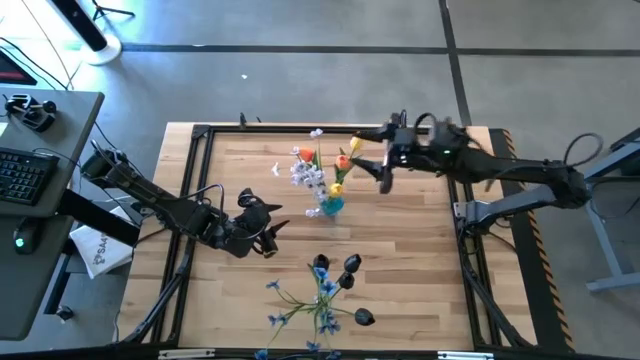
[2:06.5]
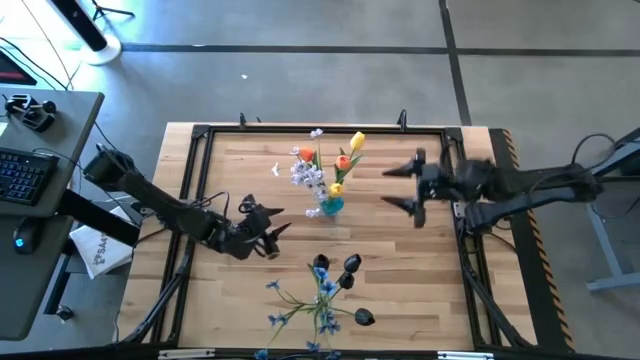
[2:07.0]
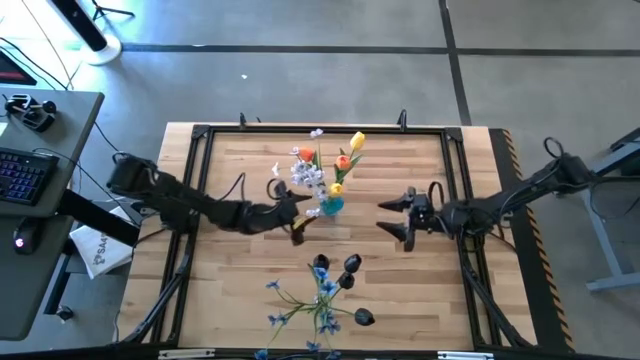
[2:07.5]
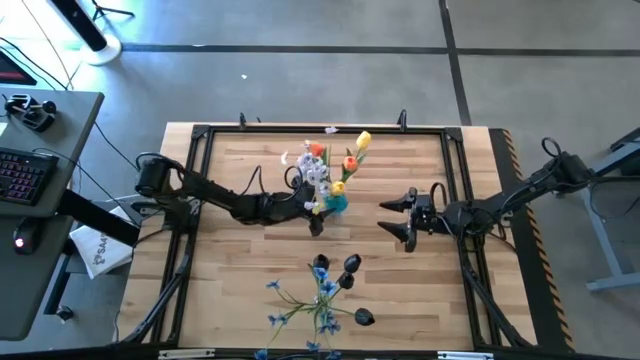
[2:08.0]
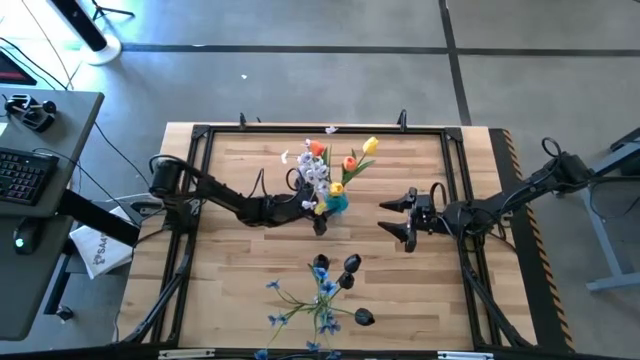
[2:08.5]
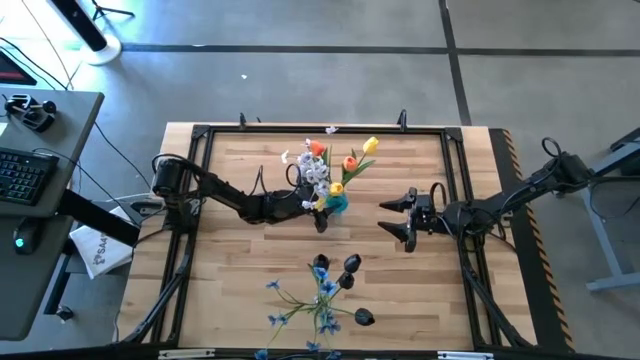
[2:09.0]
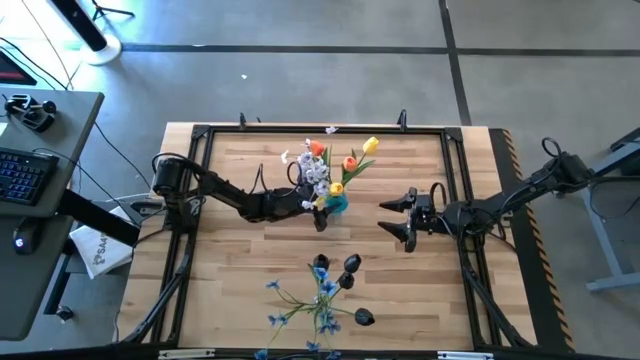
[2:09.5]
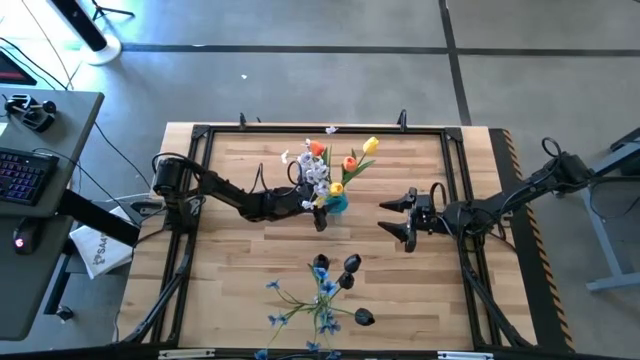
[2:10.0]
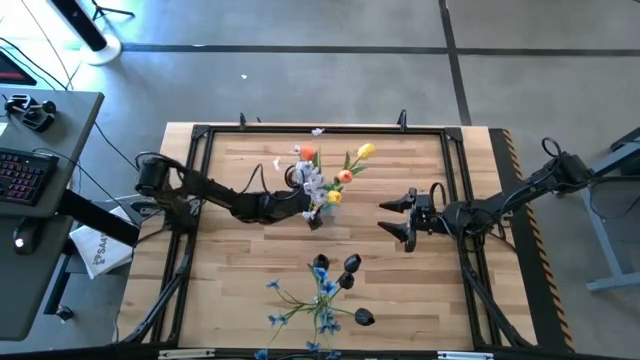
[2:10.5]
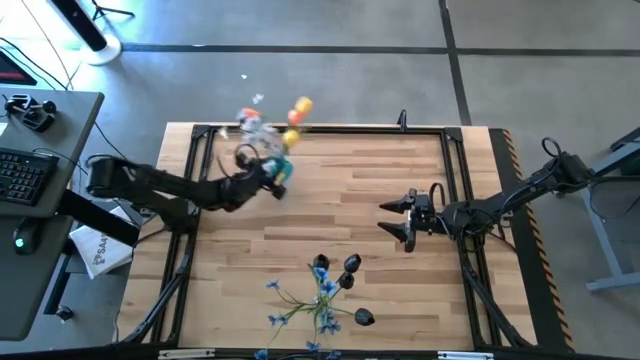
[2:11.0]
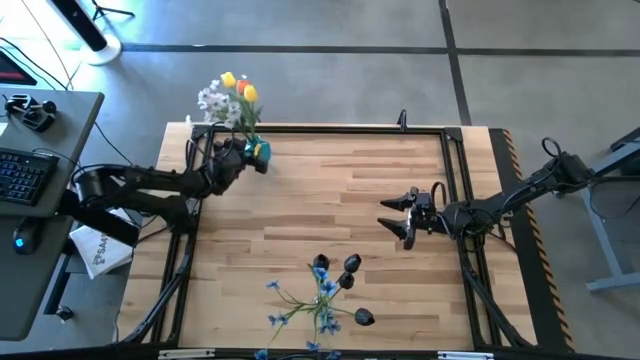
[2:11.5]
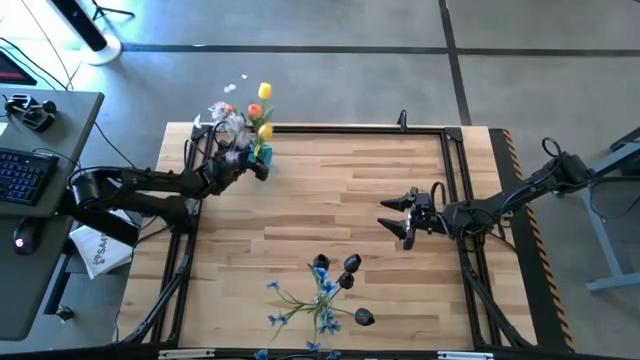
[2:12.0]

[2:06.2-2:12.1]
Task: Sort flowers into vase by color
Move the blue vase to the top left of the table

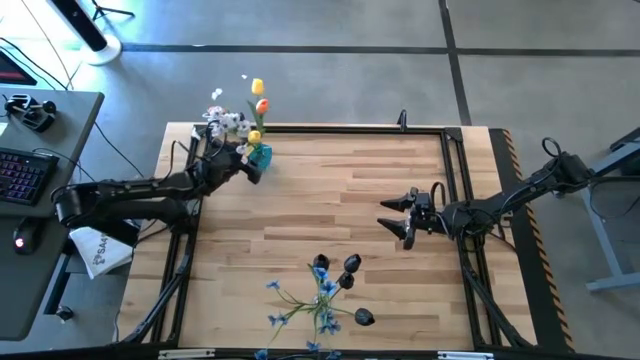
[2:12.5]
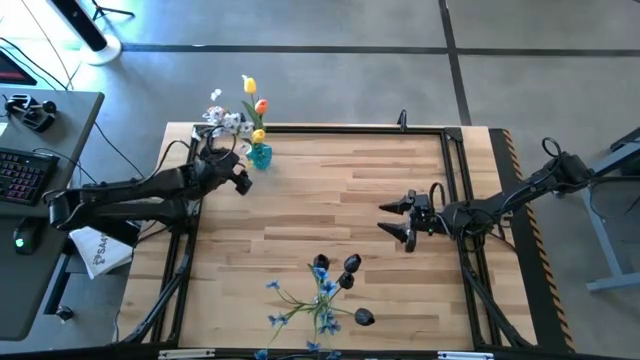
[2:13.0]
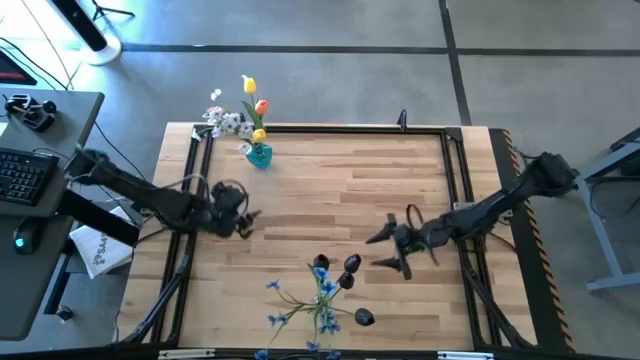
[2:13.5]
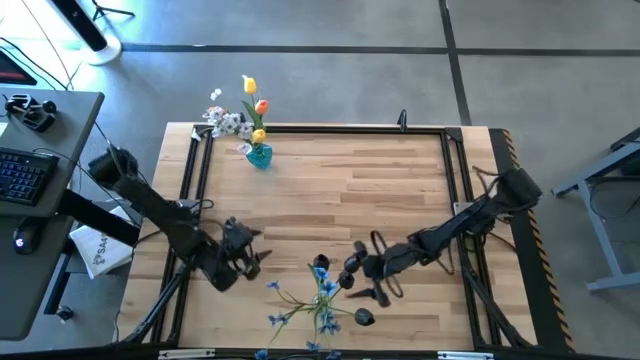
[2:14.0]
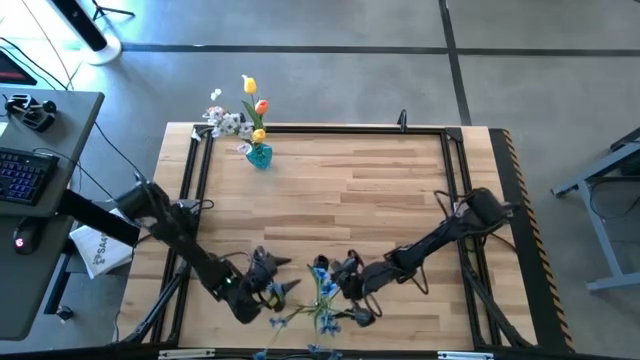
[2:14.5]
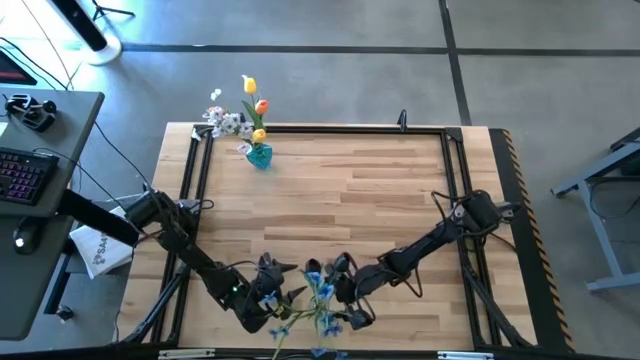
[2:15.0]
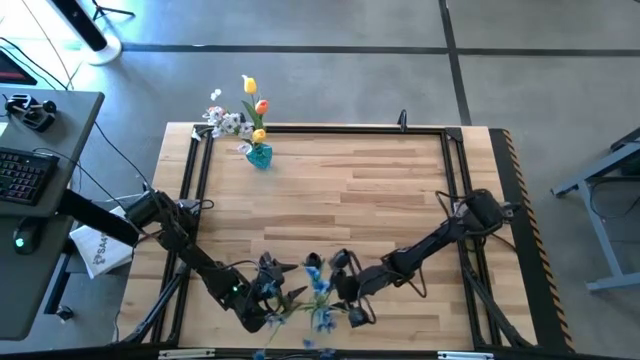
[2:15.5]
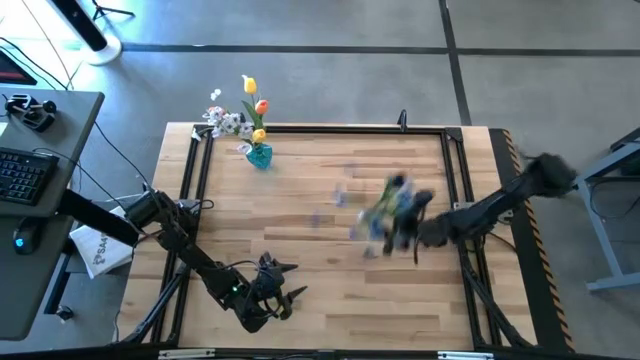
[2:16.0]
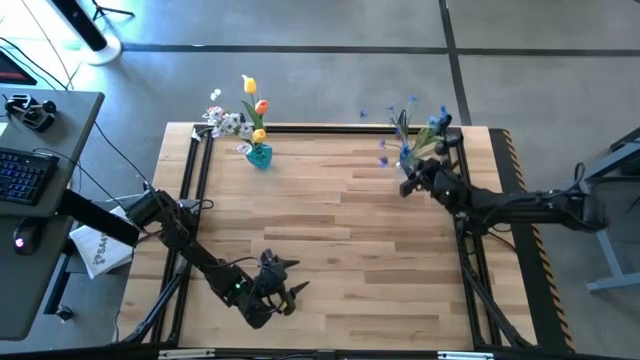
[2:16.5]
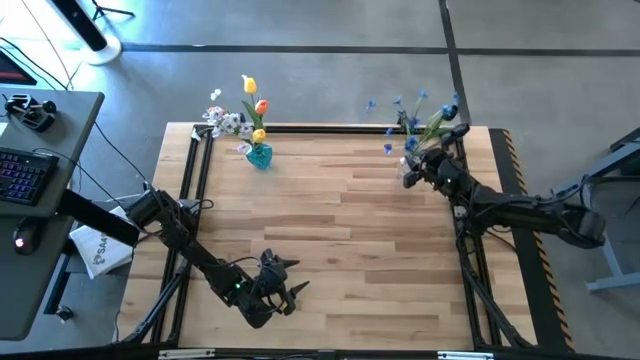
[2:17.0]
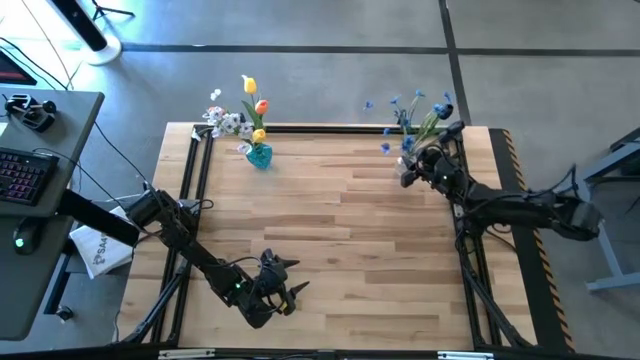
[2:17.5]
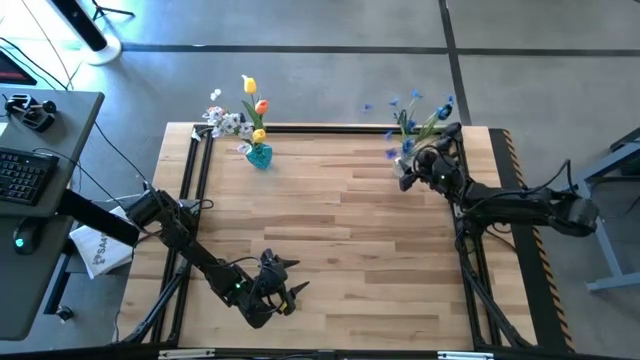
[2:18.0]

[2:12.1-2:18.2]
Move the transparent vase to the top right of the table

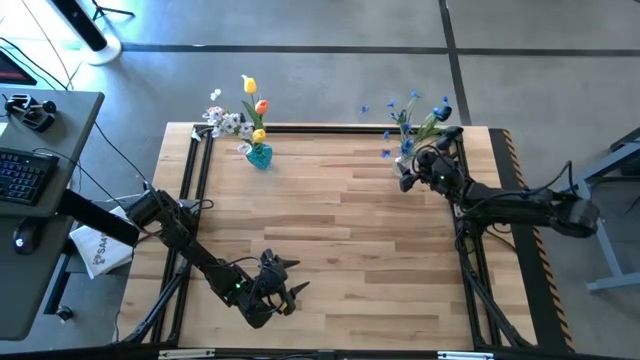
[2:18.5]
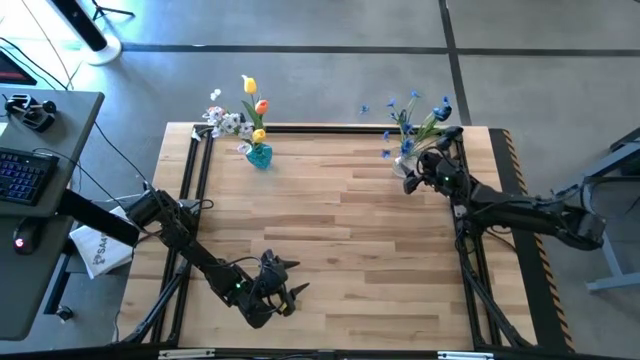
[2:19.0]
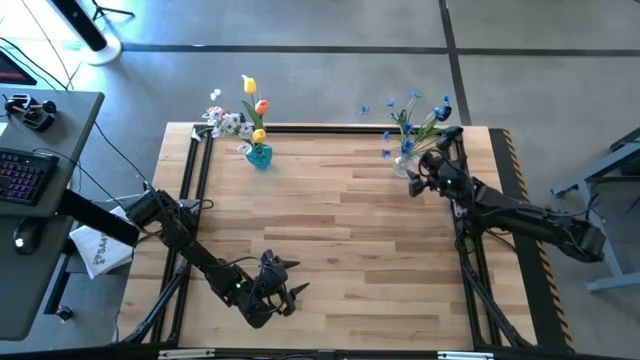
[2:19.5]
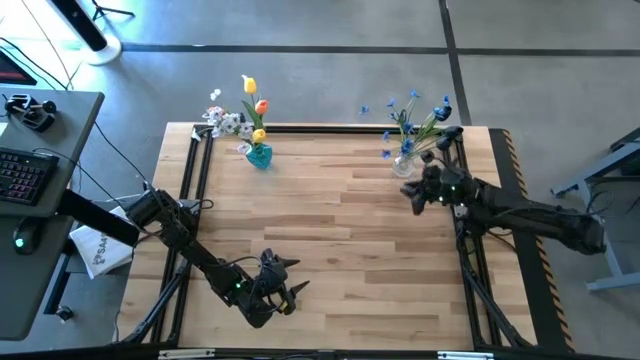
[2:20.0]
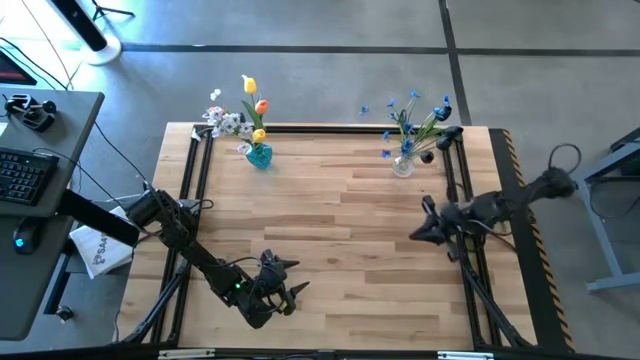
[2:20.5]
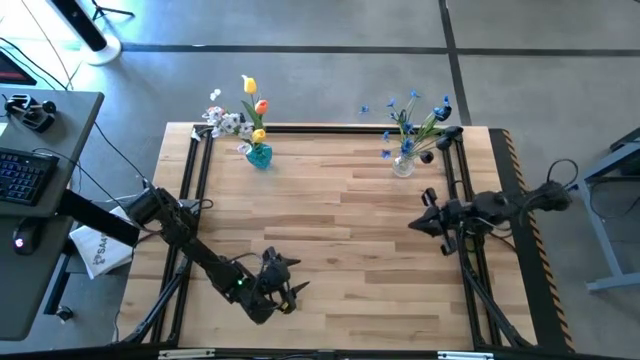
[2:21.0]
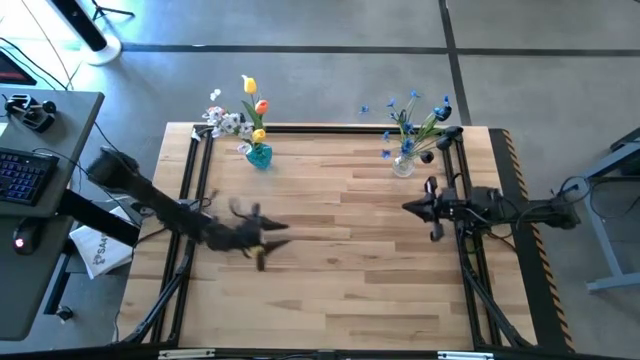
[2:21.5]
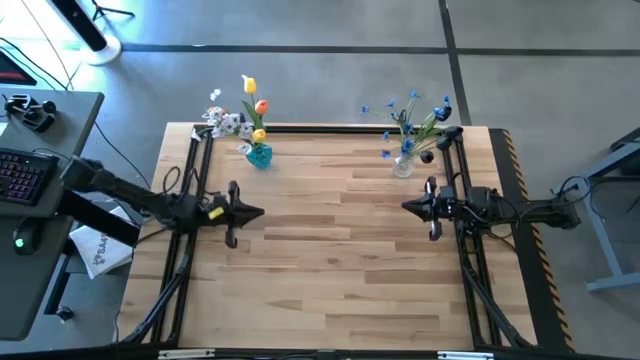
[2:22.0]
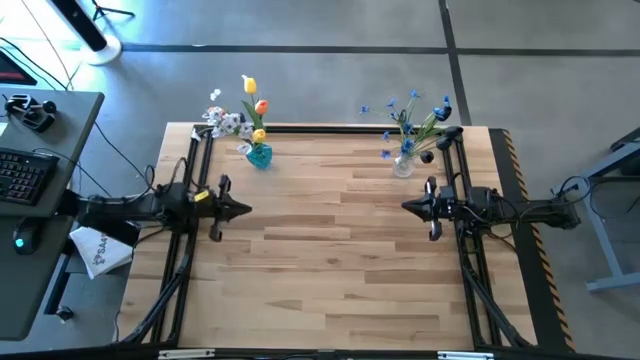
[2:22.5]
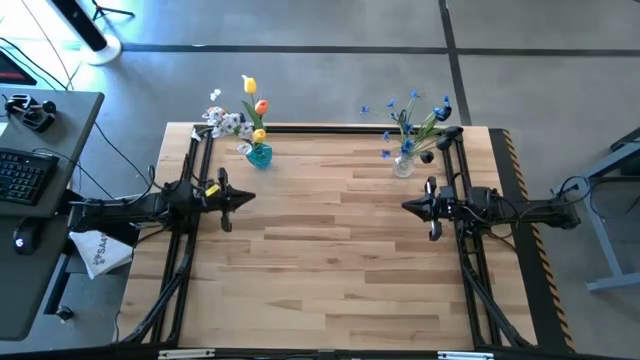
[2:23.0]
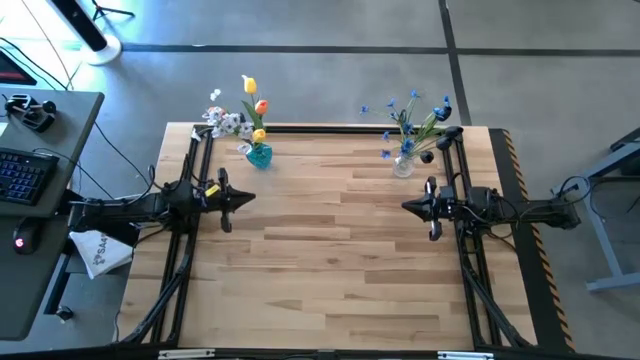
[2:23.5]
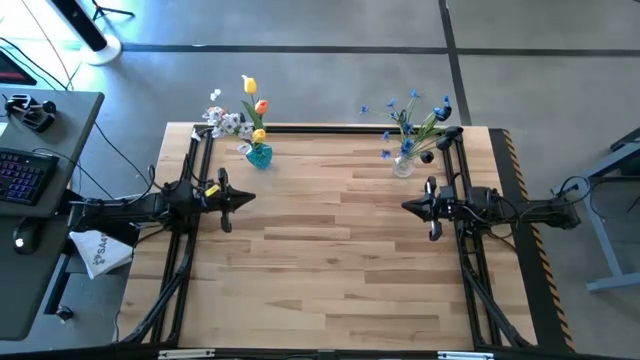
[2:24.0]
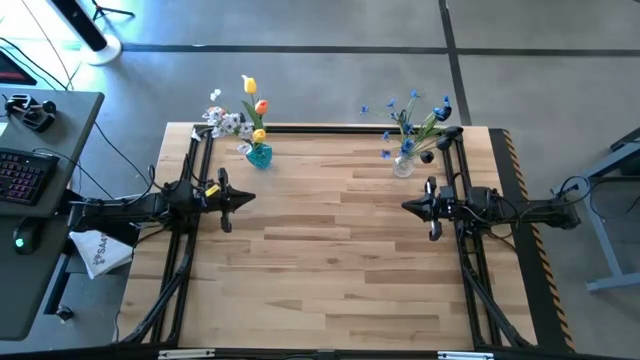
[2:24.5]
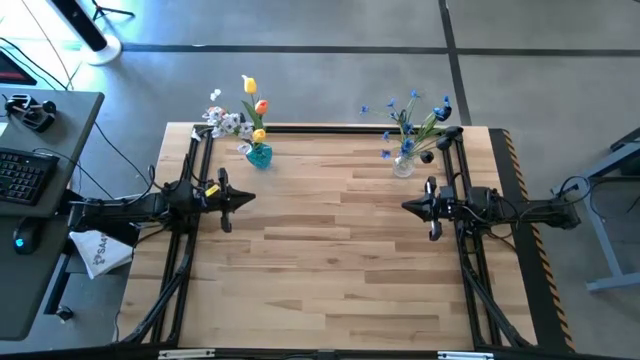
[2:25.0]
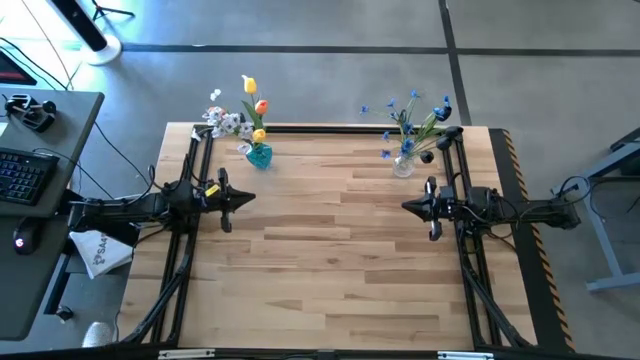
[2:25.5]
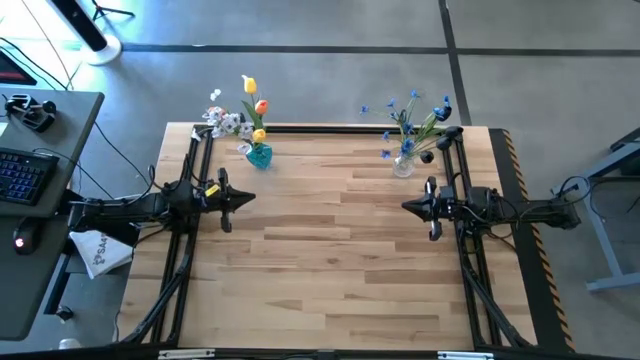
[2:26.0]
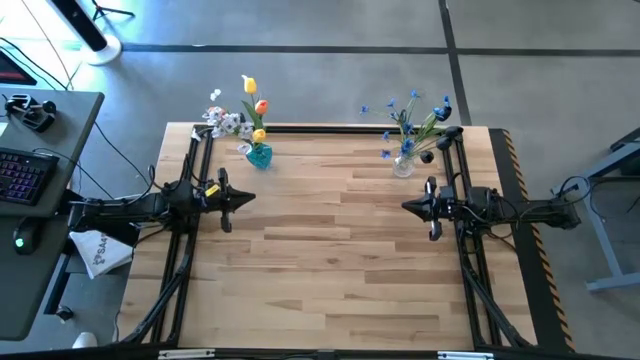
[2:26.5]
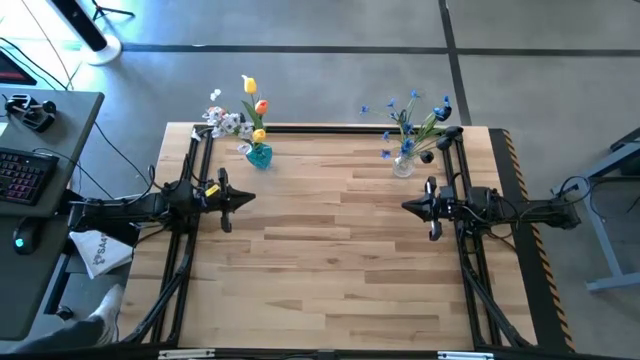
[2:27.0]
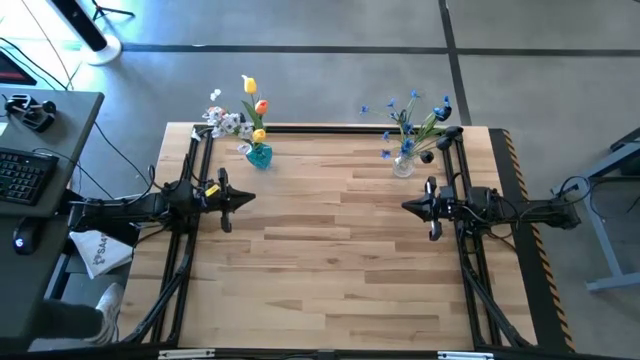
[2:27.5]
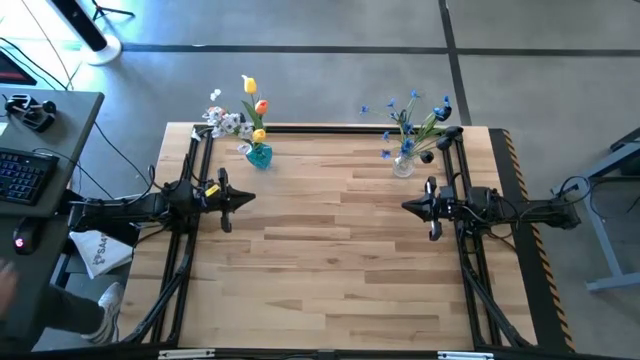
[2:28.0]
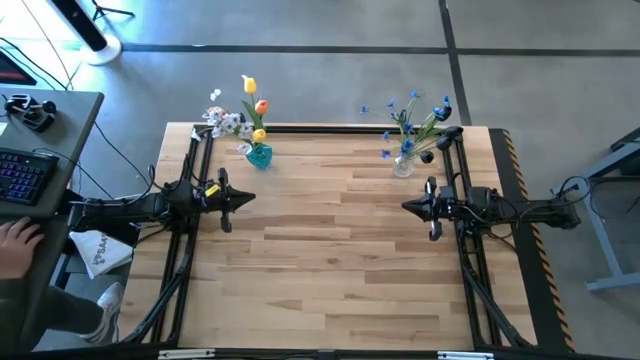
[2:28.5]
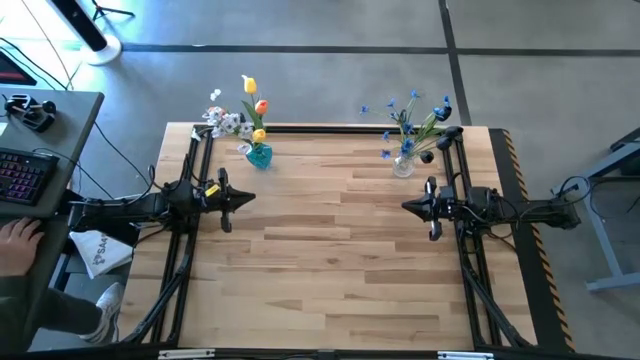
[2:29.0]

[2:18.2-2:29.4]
Return to Home Position
